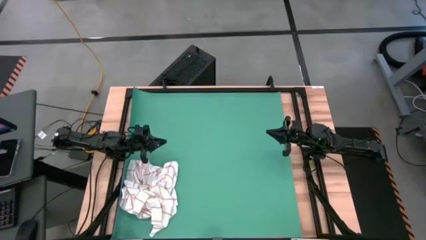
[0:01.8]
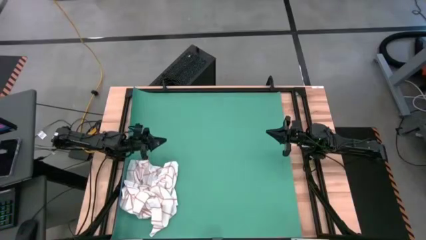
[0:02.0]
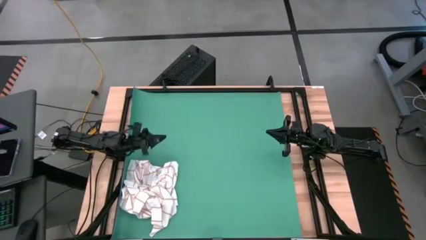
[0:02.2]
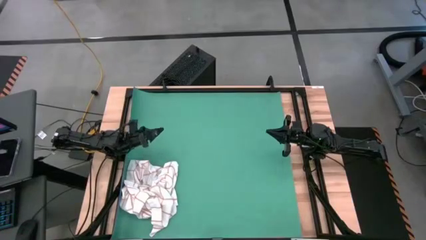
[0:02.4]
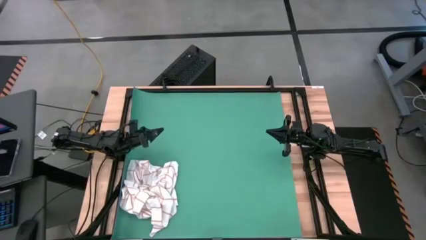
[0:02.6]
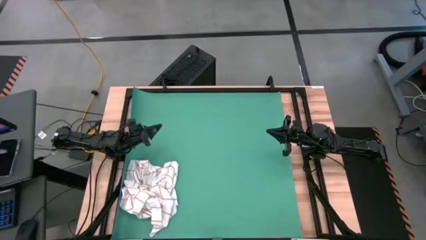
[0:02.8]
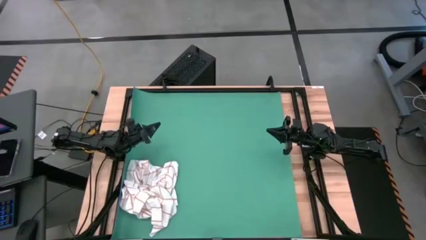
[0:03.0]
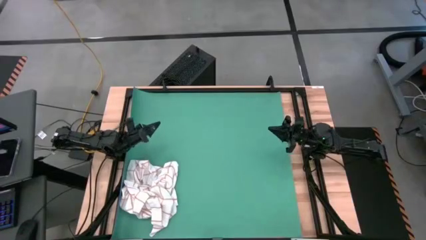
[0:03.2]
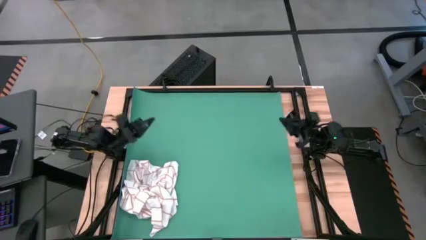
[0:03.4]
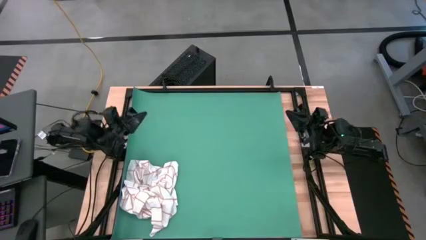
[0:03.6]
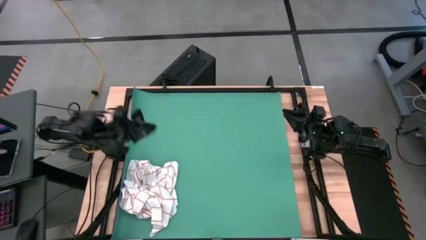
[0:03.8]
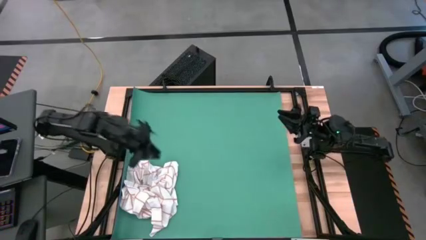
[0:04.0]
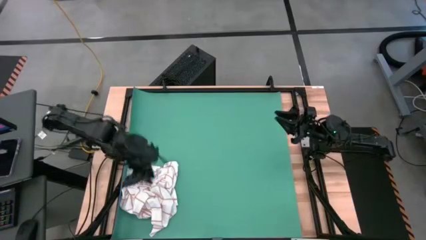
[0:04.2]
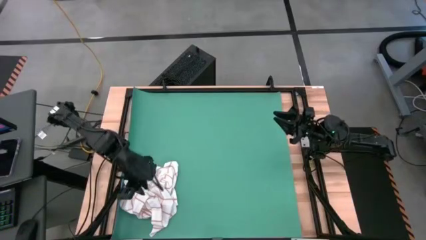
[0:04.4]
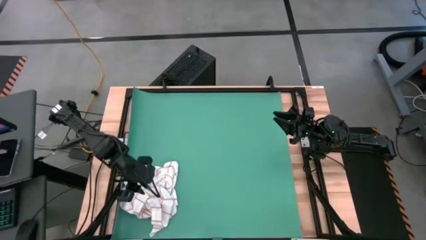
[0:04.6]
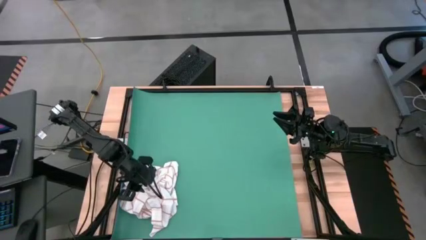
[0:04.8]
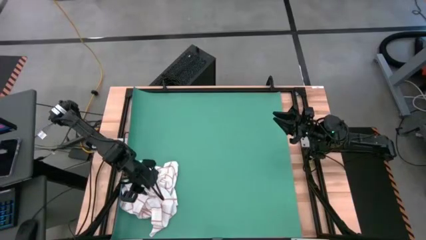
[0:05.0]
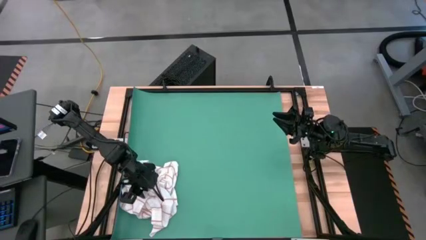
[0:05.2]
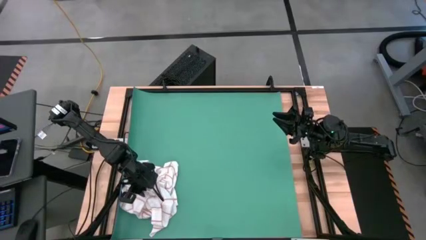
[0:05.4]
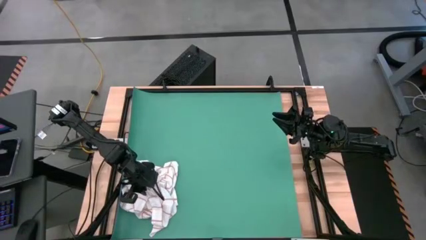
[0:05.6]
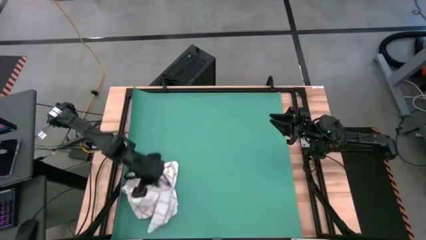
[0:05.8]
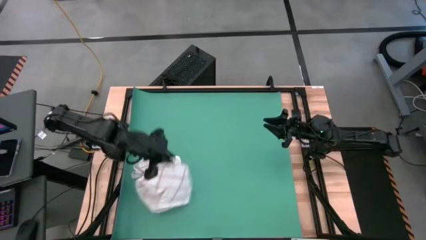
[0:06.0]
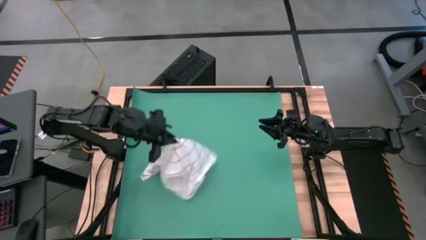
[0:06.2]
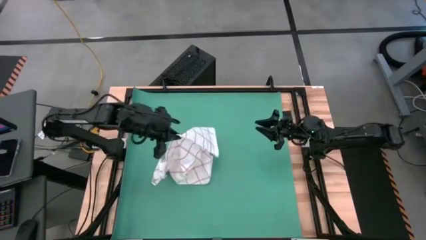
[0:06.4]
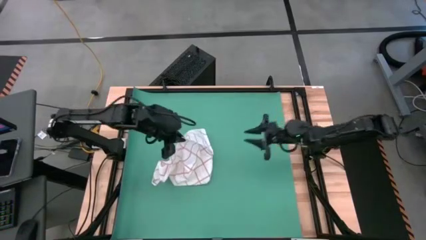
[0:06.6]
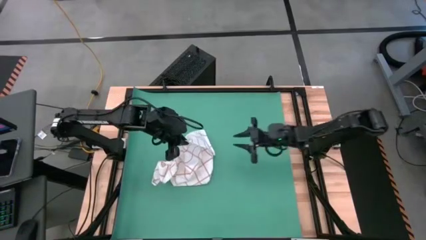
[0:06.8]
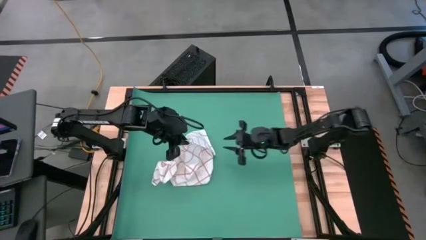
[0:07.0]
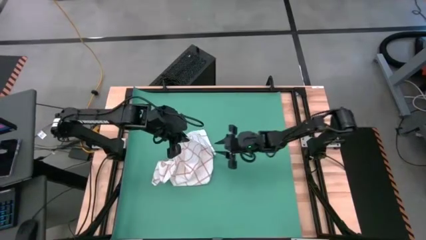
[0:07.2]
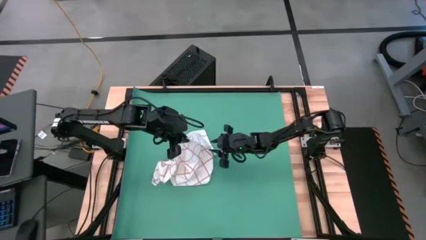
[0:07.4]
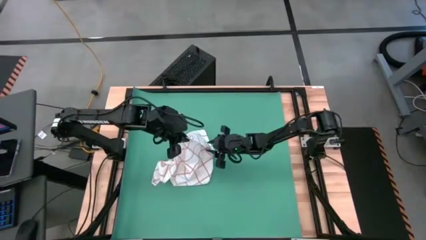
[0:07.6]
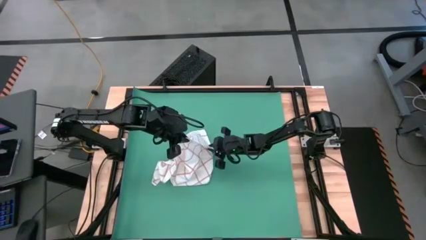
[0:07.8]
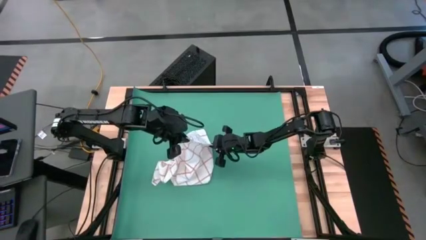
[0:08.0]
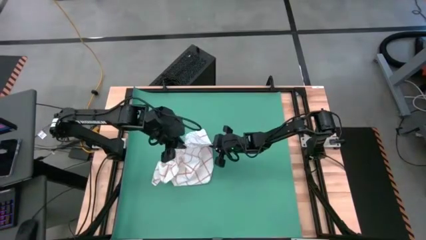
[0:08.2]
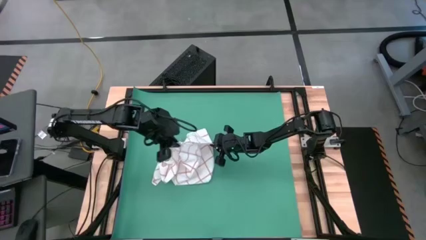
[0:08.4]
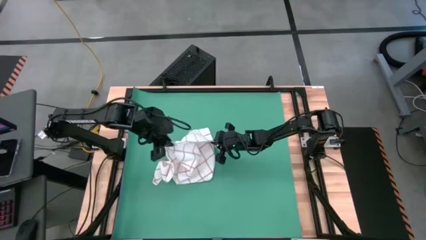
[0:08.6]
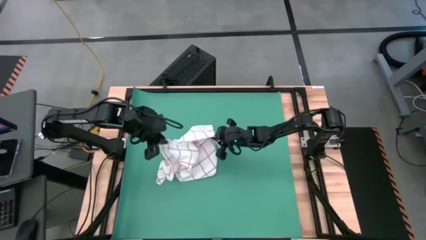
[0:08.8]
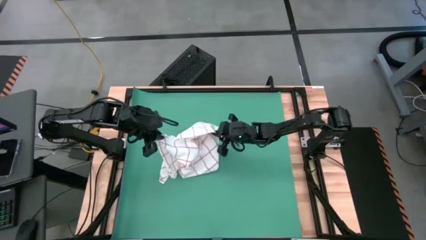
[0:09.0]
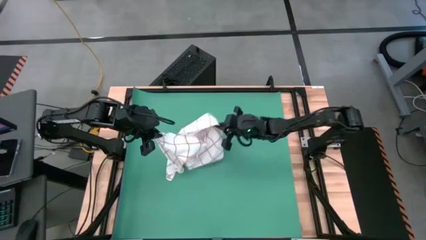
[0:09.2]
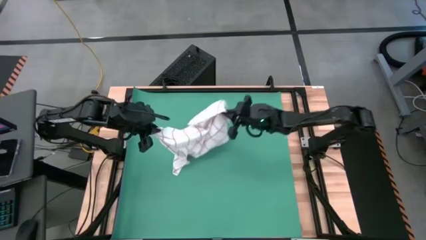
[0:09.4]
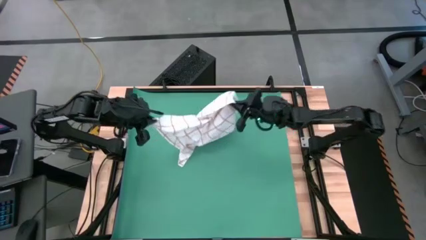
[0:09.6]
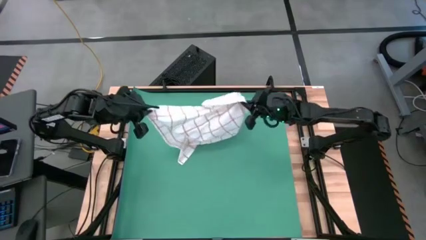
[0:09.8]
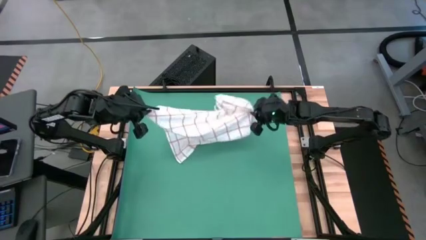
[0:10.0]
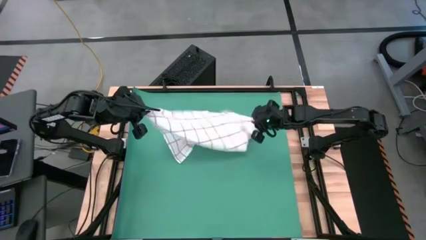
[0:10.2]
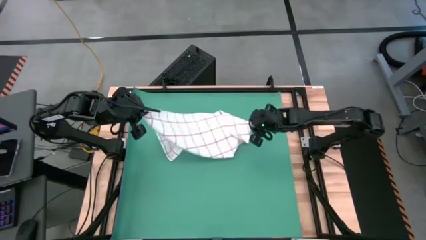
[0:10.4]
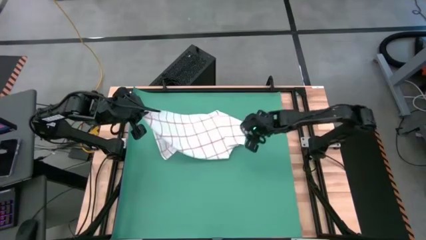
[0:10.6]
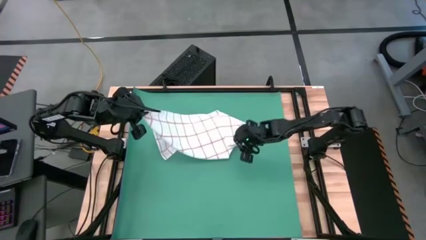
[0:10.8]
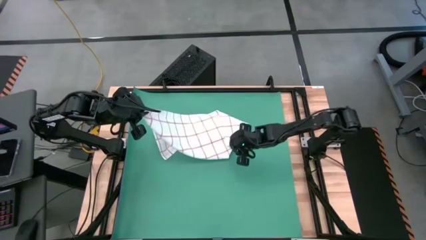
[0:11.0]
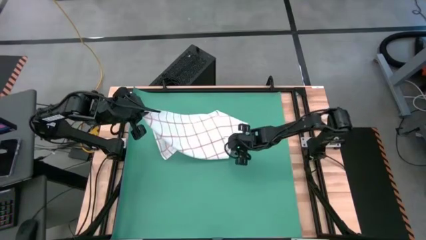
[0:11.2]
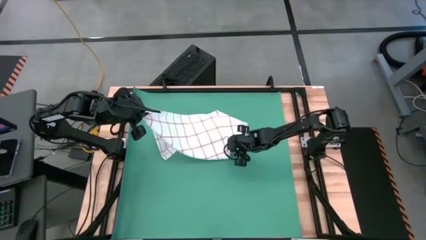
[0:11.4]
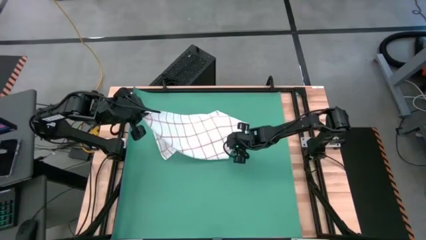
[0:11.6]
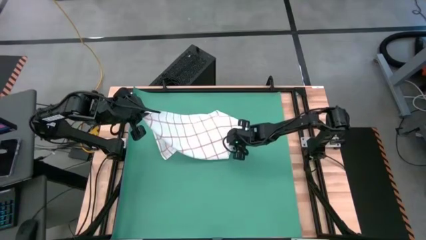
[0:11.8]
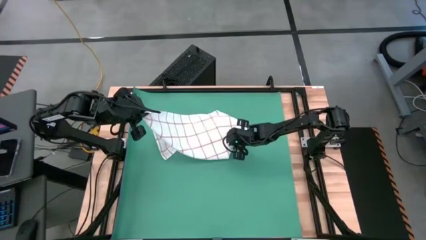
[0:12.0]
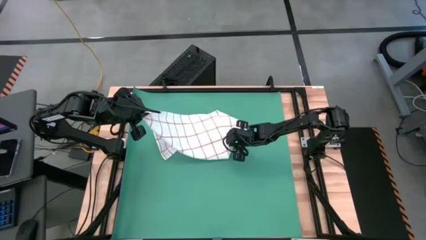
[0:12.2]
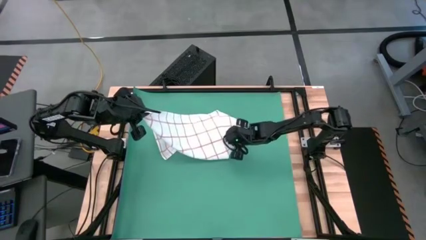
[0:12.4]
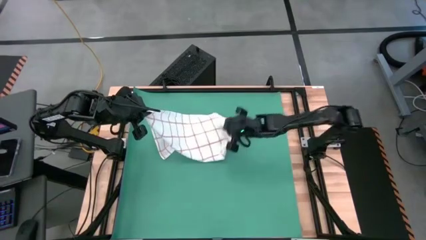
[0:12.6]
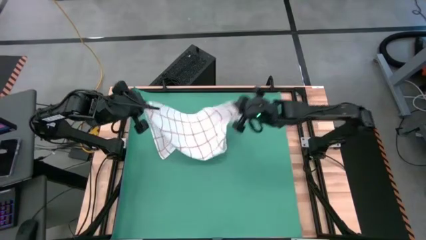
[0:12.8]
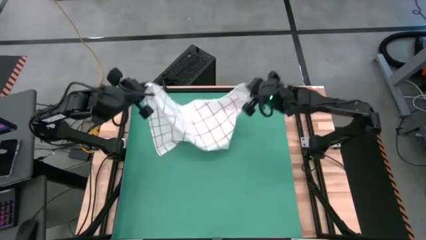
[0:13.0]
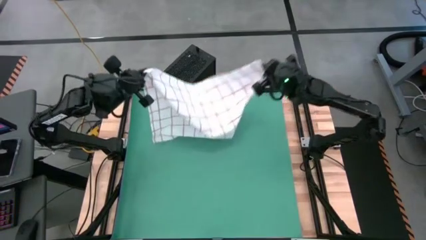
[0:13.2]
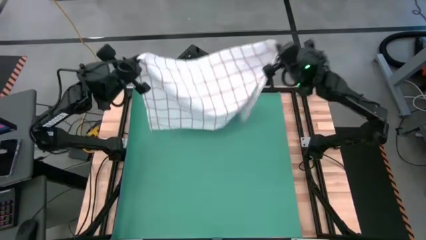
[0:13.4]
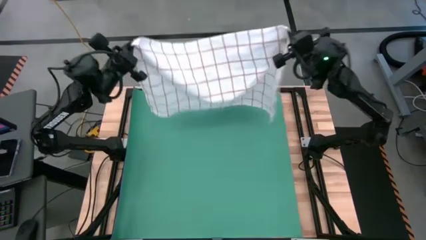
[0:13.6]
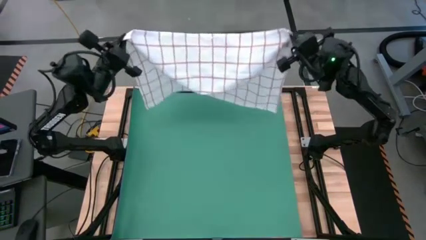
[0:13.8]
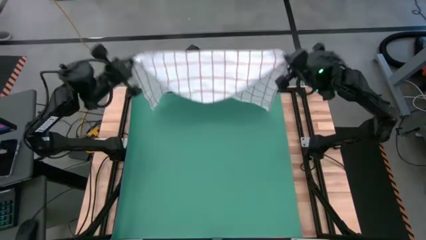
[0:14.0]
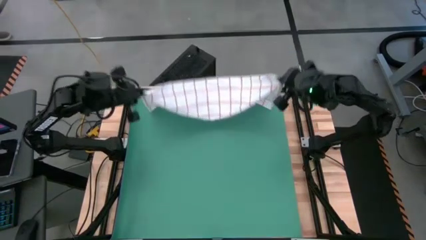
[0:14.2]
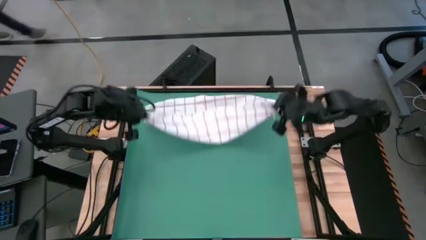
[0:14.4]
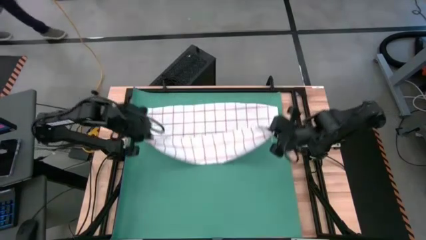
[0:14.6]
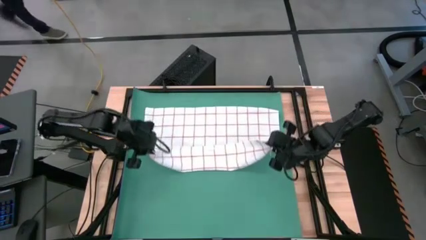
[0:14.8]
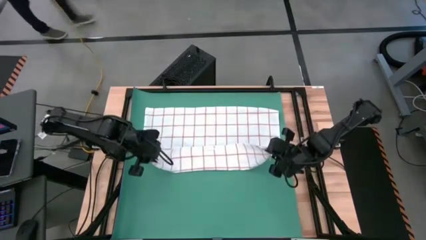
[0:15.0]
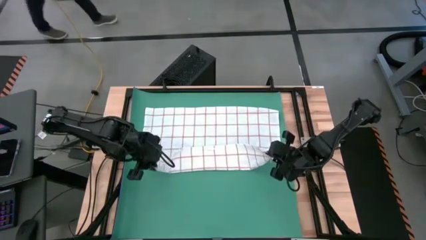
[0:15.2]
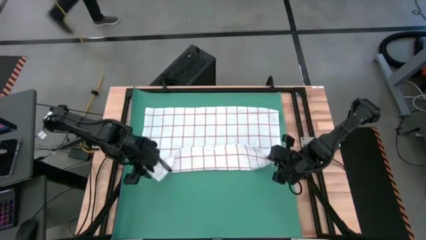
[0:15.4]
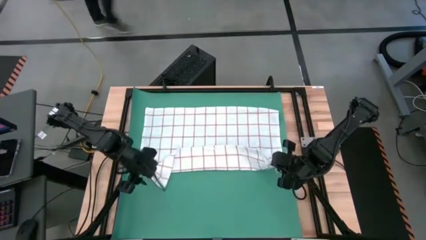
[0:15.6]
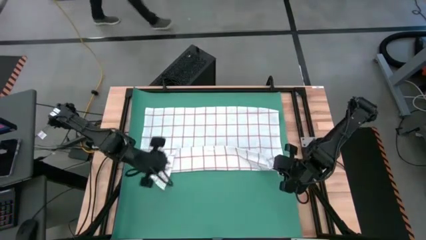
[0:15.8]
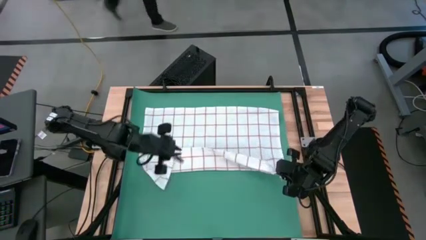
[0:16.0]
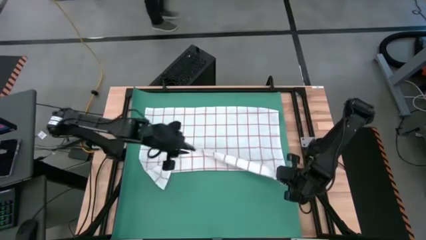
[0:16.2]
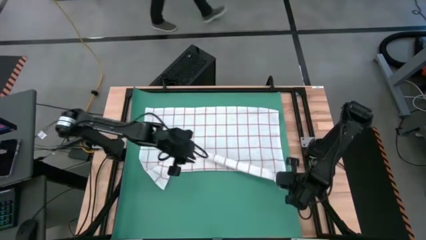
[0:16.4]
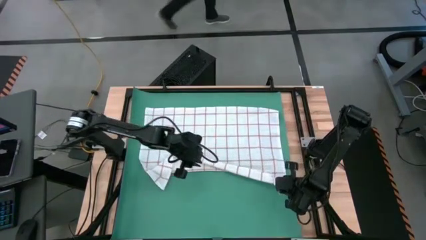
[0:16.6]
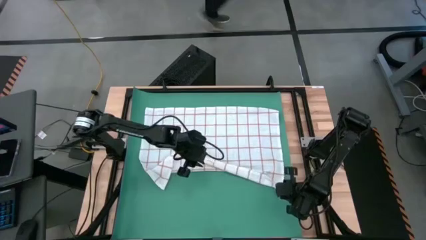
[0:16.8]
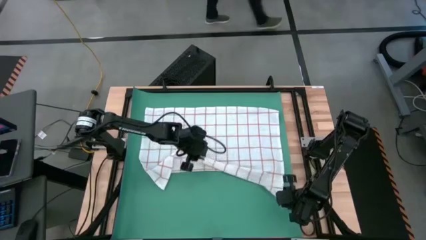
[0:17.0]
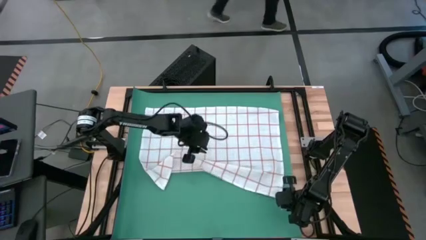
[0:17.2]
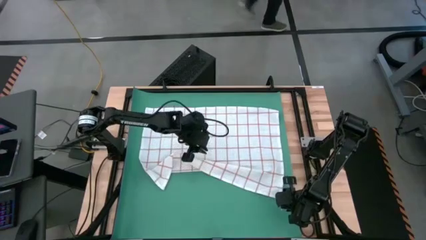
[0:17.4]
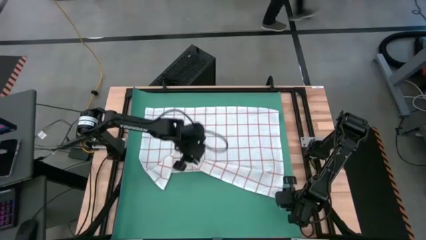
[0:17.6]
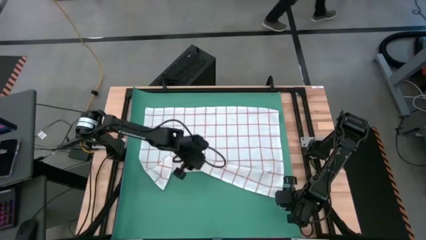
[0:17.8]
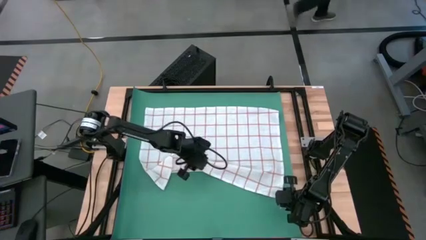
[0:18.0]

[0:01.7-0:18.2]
Task: Roll towel
Roll the white stripe towel
